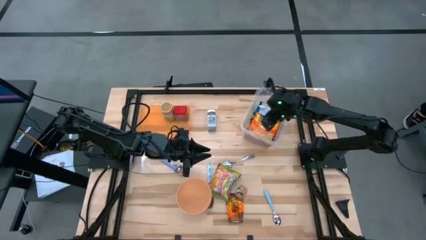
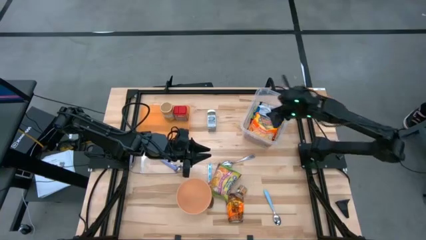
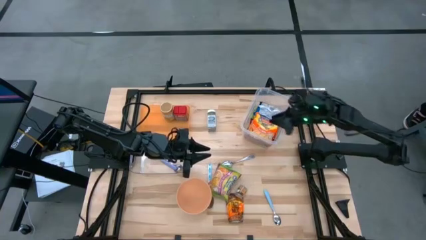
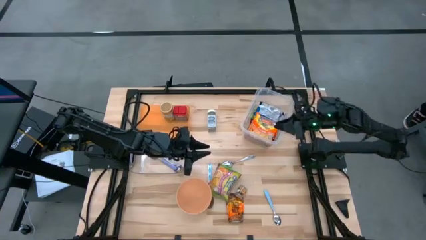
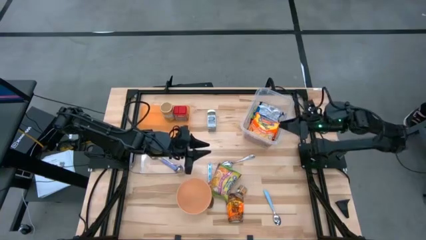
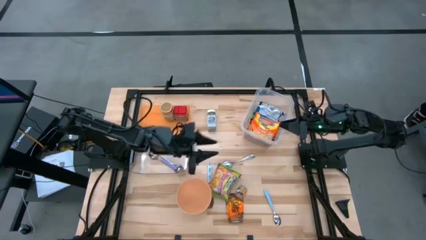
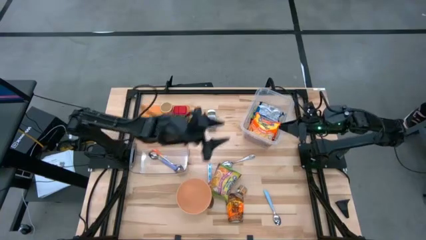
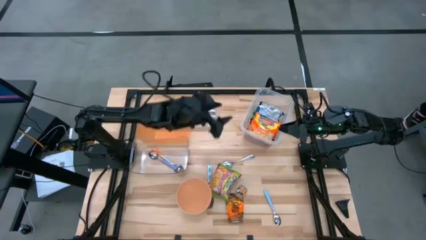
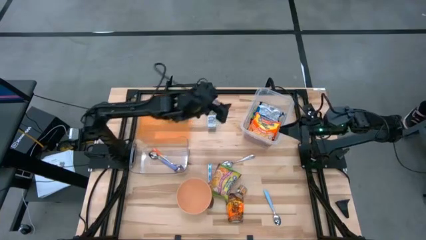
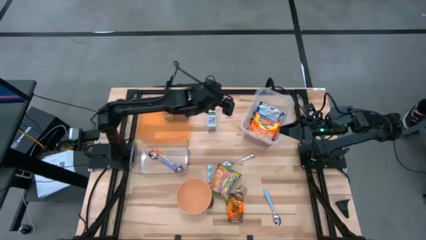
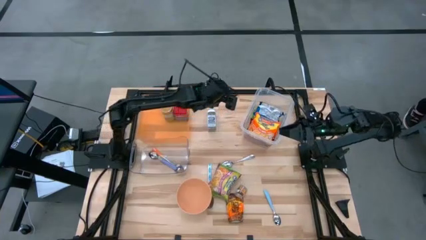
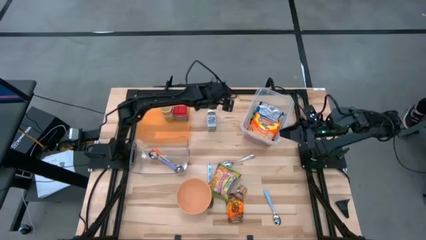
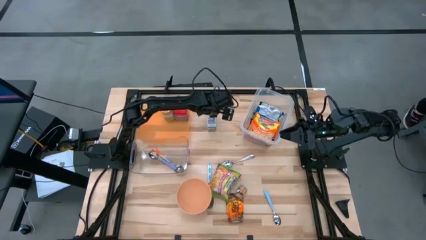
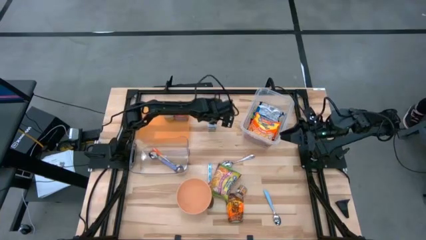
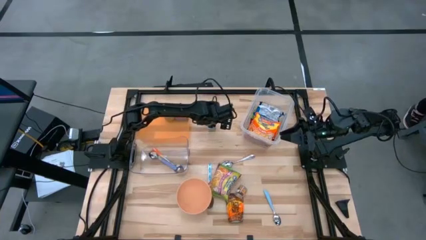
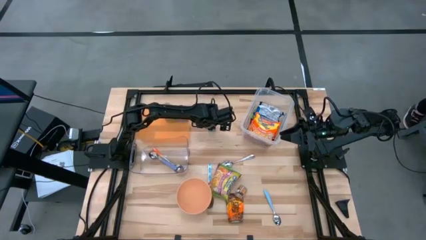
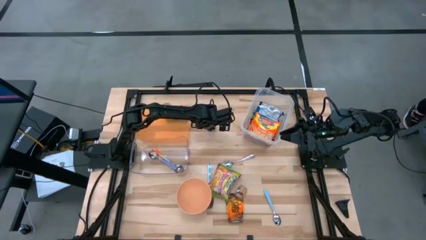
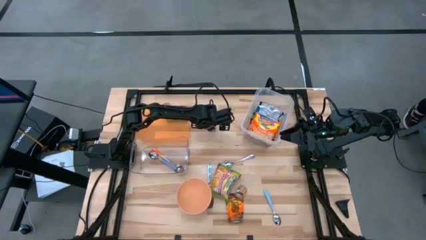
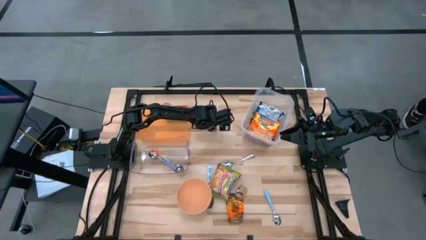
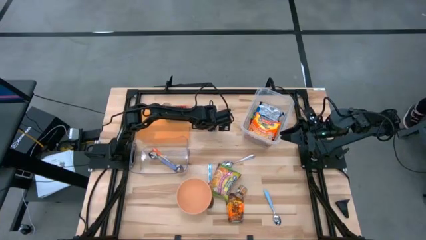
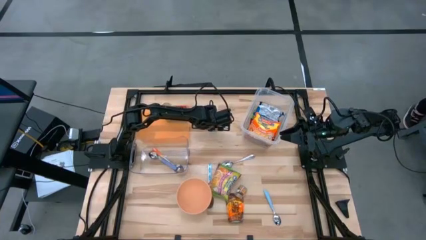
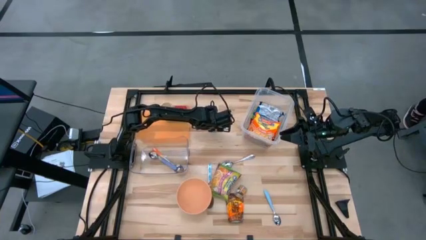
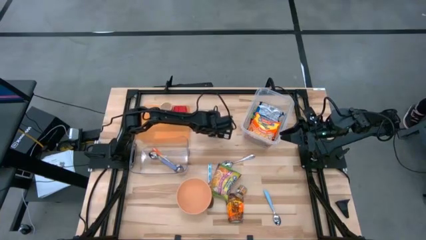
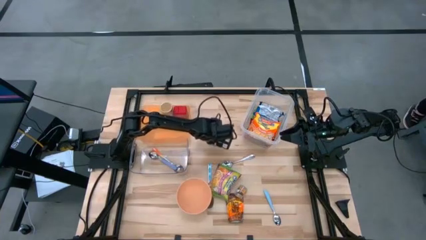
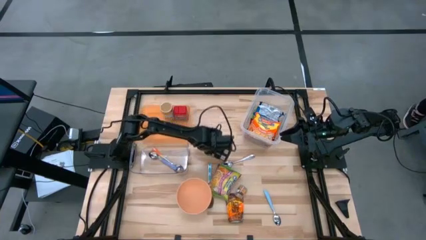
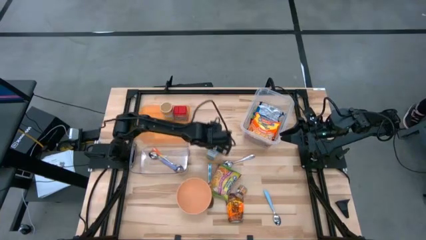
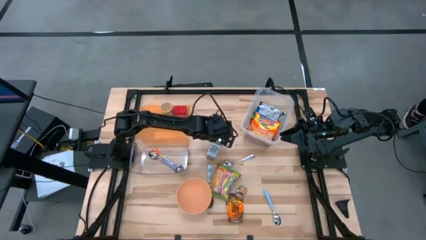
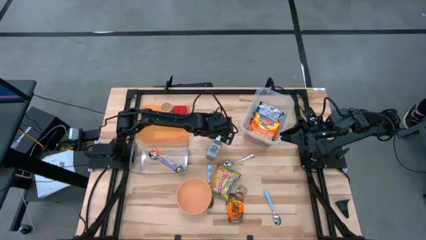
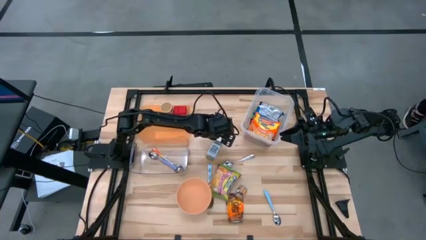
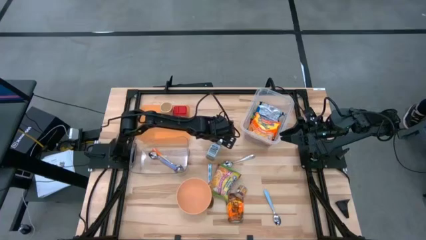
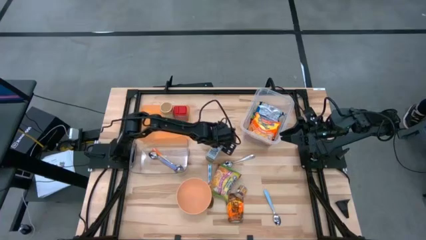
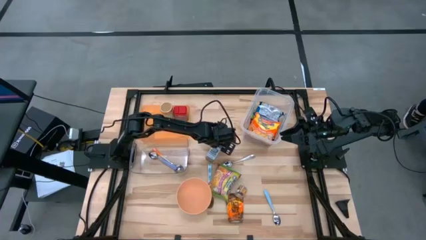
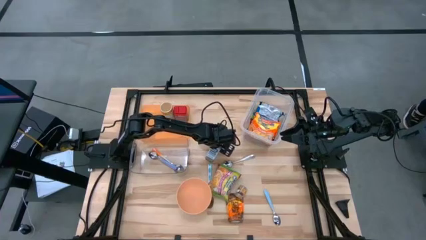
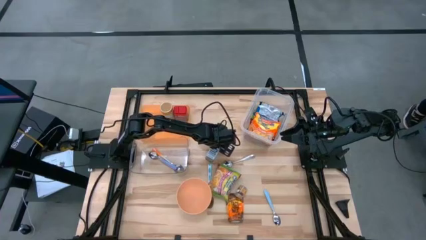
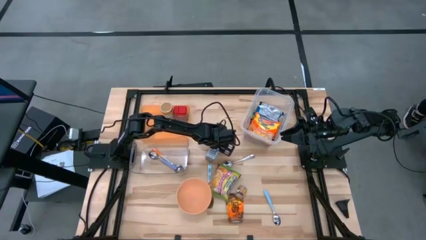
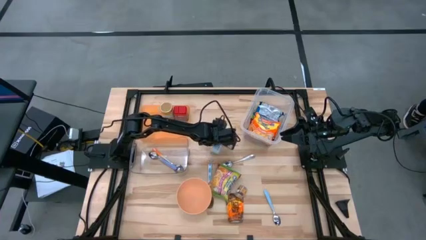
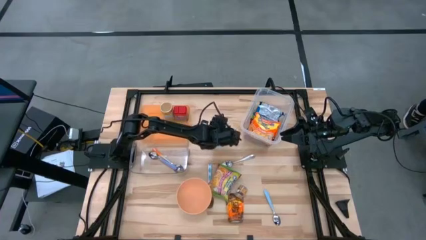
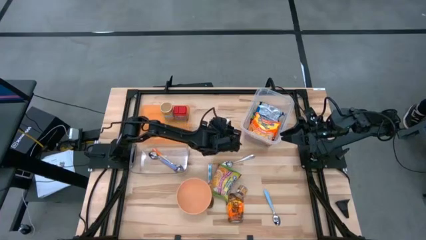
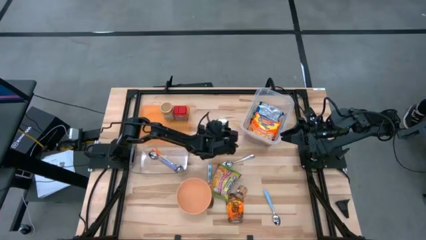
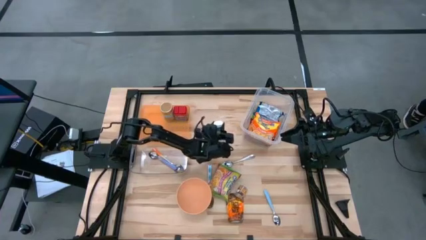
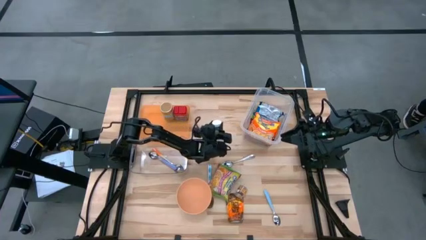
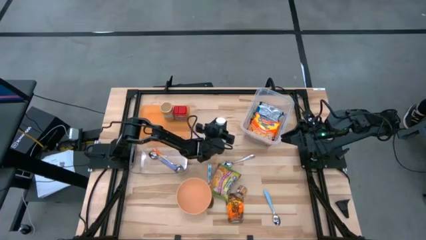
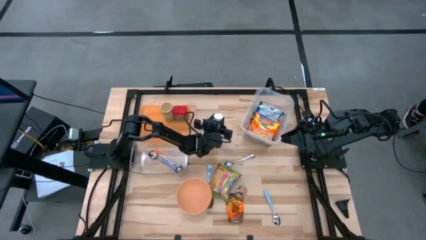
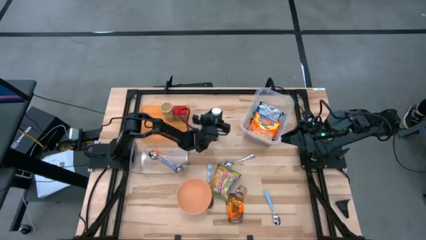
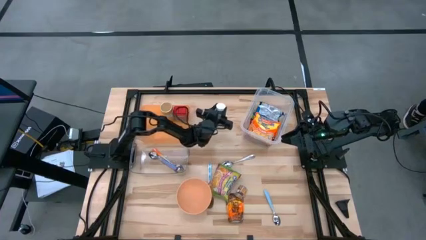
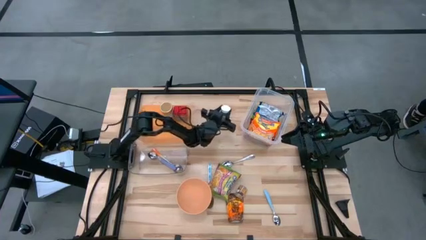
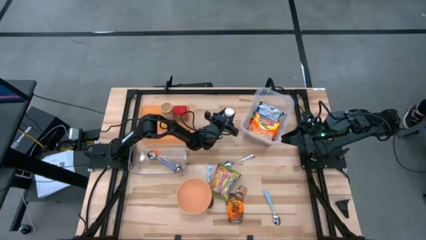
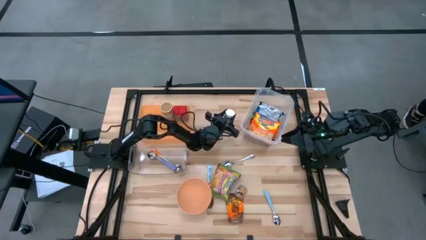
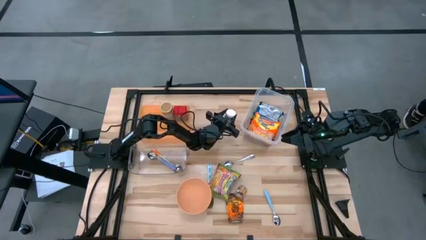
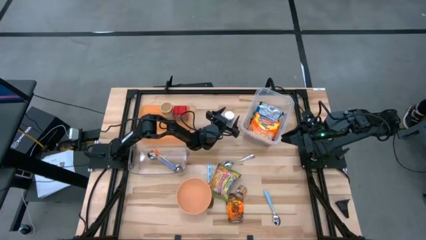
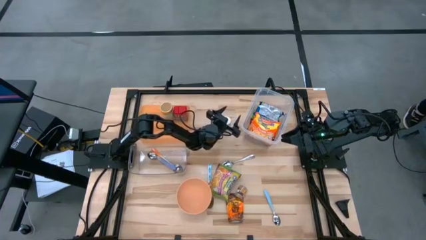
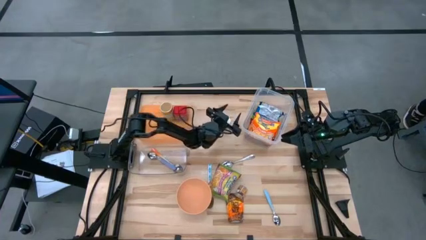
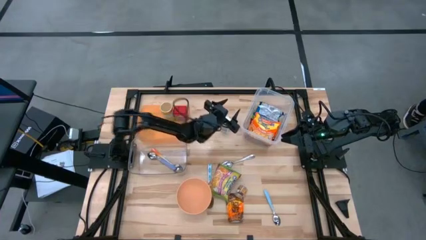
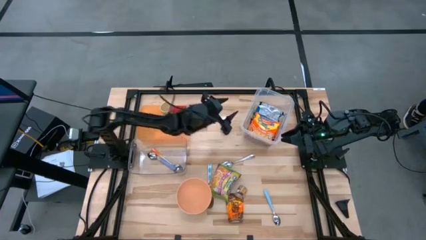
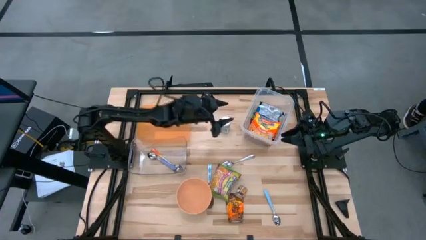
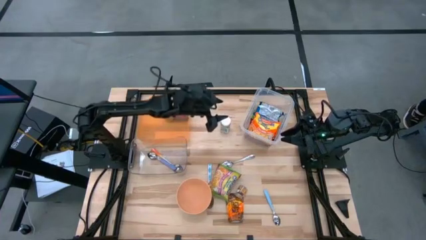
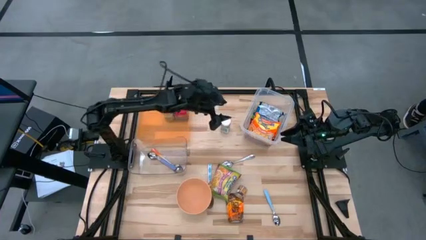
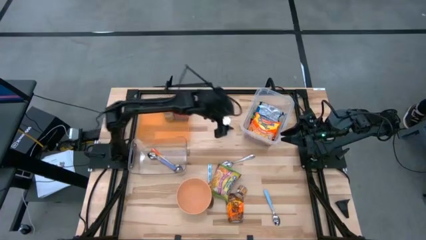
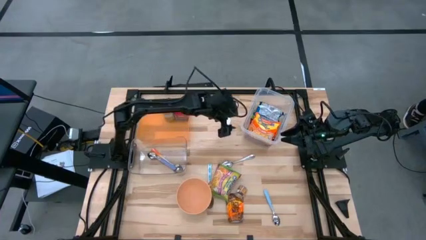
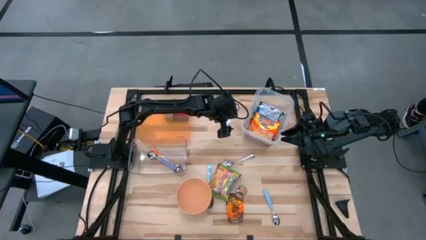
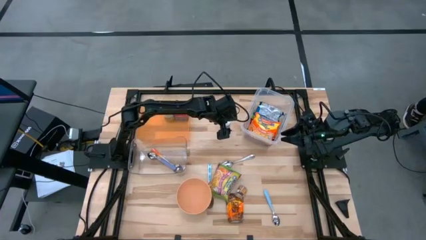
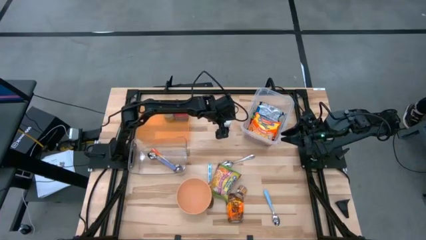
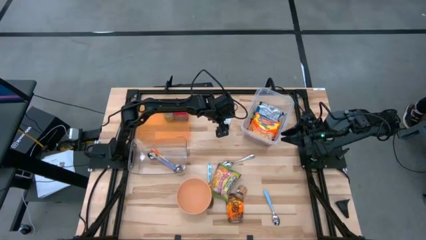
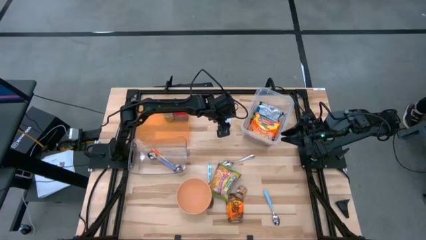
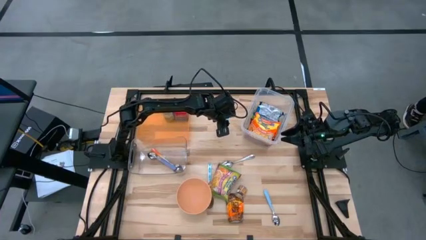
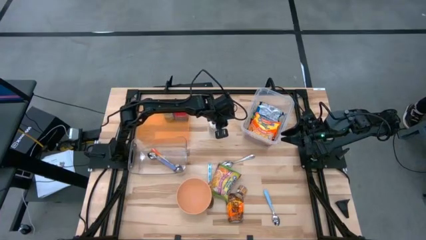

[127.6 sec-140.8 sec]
Task: Pick & Place Food Item
Put the white seasoning bottle into the orange bin
